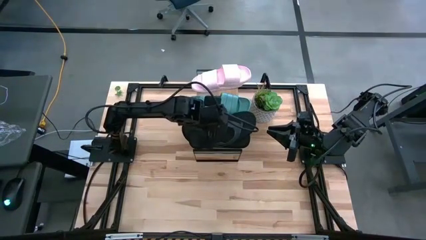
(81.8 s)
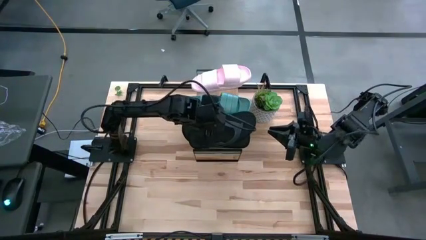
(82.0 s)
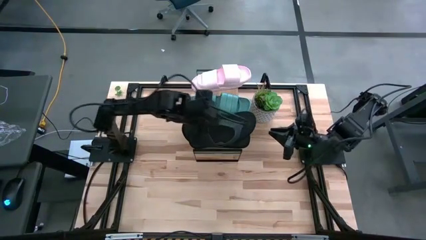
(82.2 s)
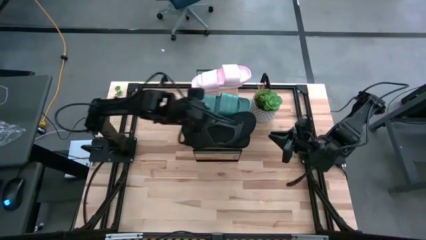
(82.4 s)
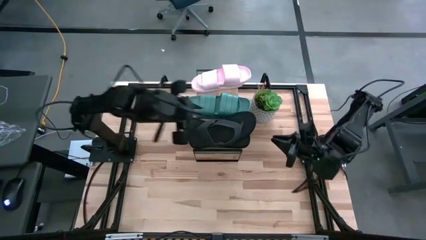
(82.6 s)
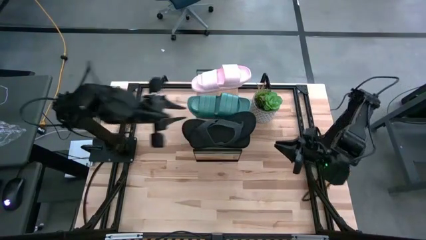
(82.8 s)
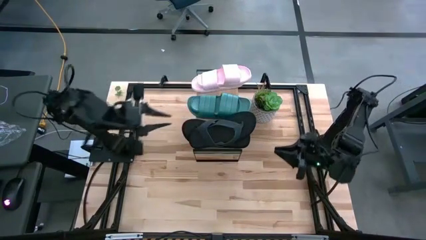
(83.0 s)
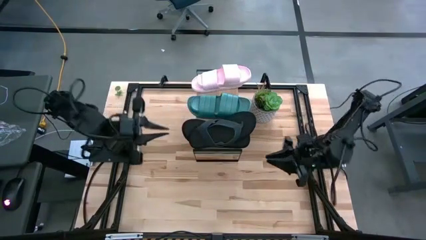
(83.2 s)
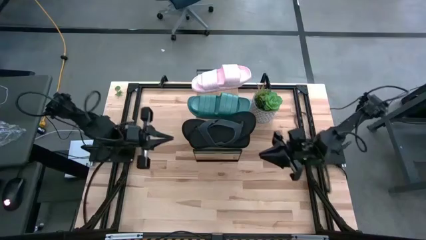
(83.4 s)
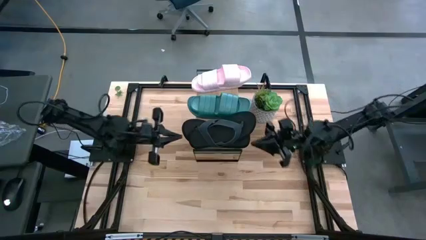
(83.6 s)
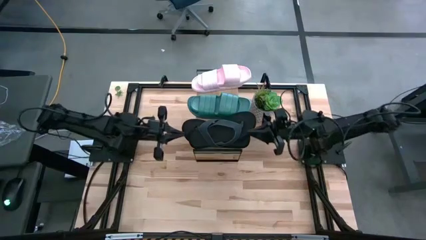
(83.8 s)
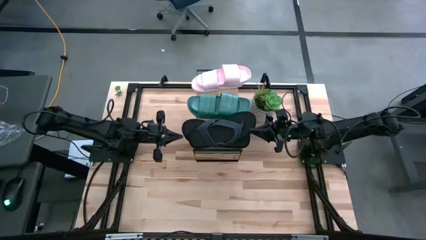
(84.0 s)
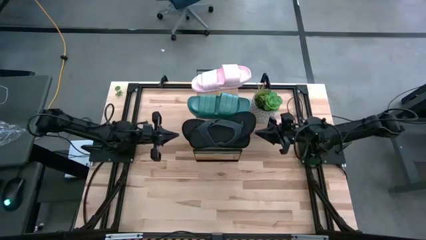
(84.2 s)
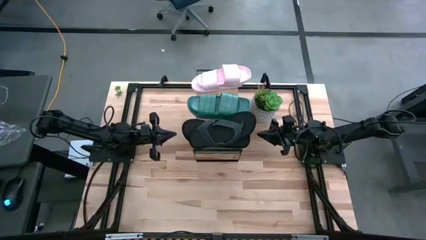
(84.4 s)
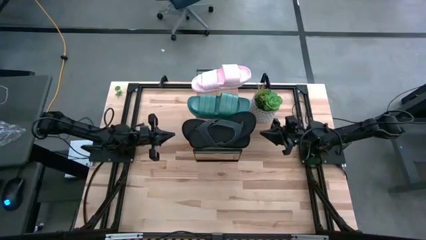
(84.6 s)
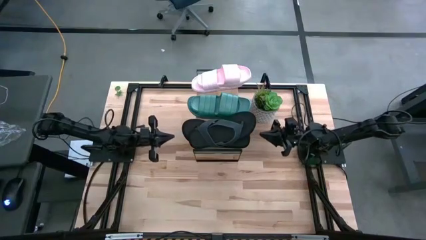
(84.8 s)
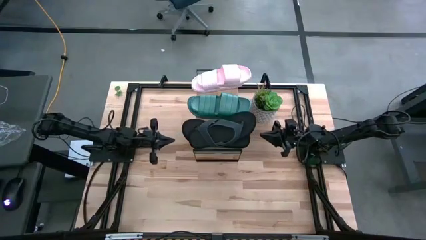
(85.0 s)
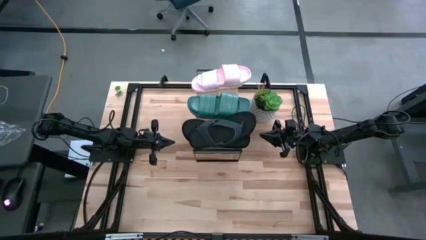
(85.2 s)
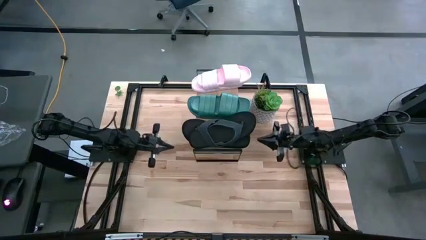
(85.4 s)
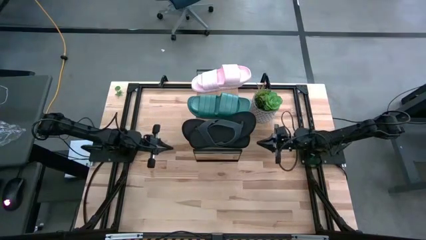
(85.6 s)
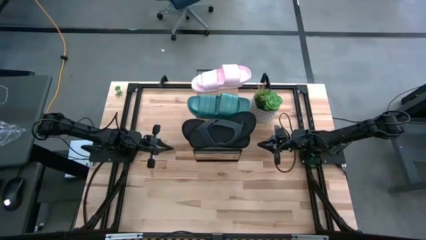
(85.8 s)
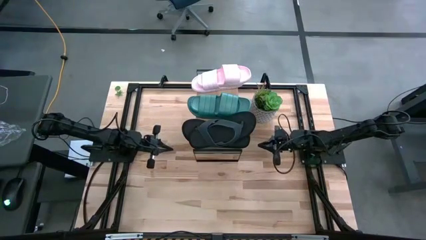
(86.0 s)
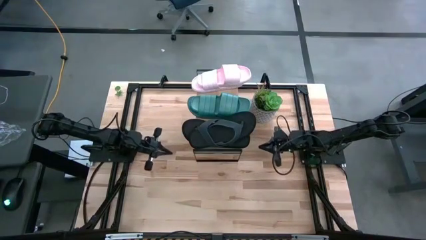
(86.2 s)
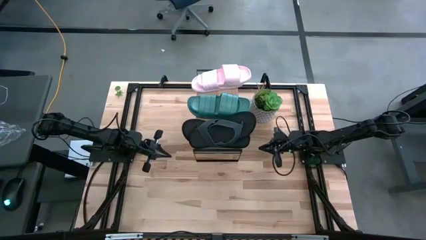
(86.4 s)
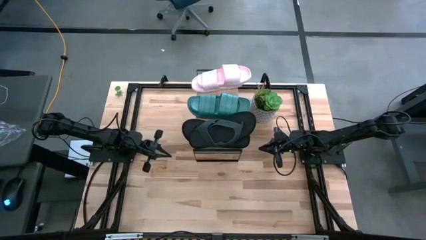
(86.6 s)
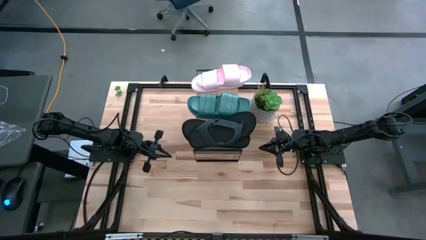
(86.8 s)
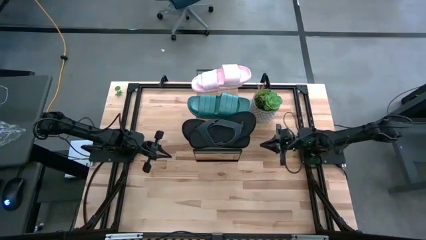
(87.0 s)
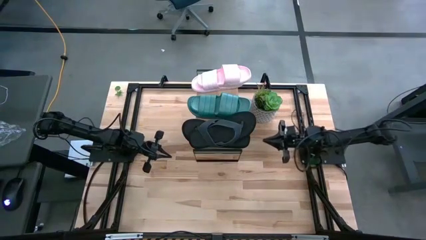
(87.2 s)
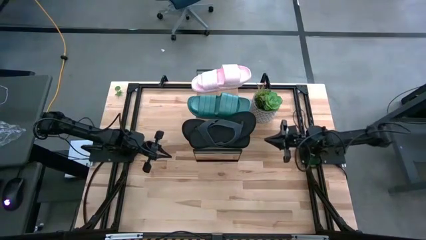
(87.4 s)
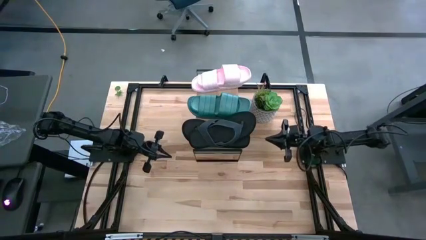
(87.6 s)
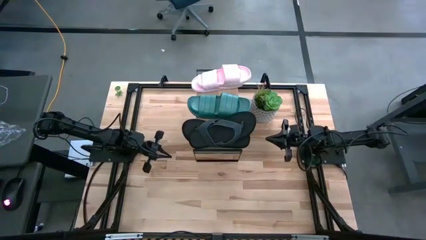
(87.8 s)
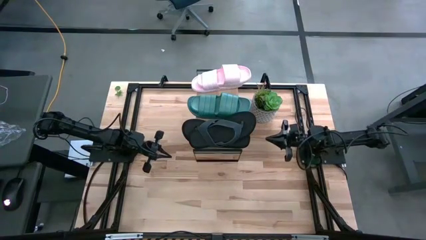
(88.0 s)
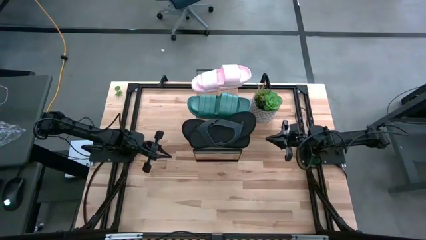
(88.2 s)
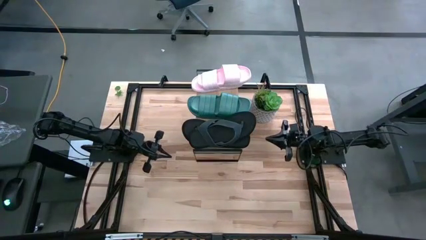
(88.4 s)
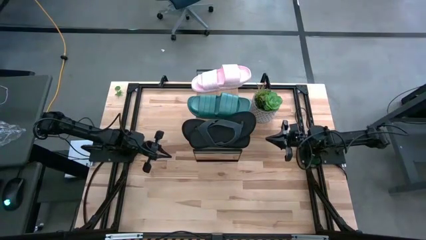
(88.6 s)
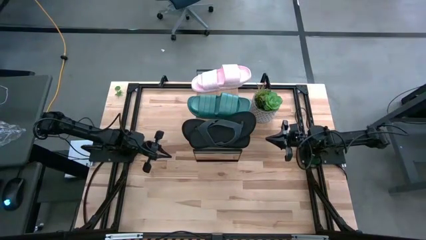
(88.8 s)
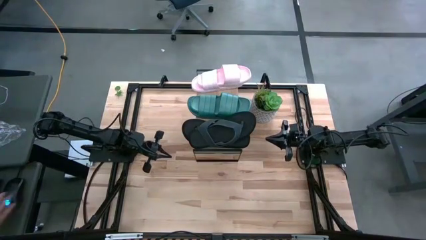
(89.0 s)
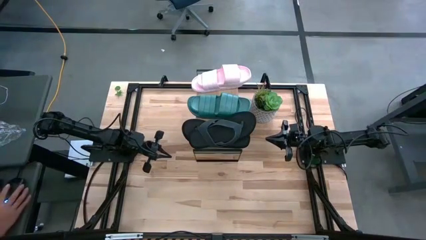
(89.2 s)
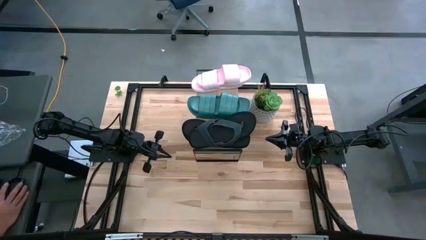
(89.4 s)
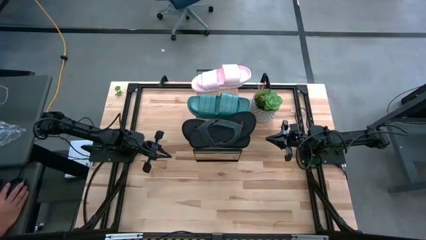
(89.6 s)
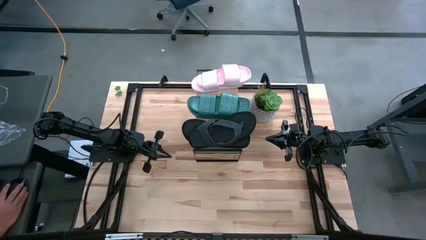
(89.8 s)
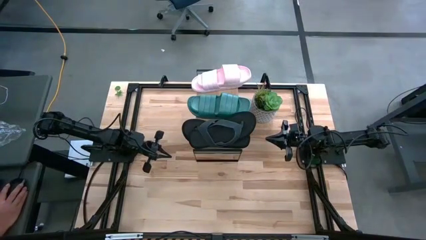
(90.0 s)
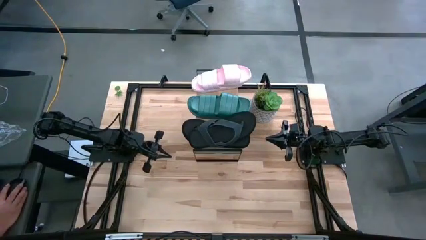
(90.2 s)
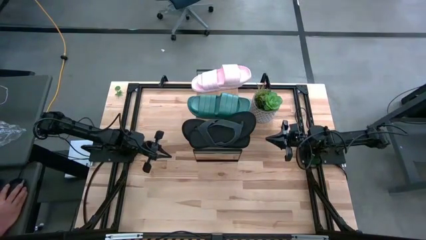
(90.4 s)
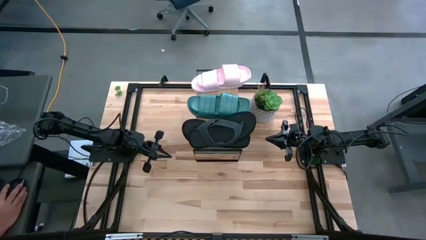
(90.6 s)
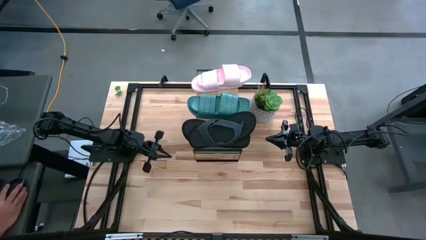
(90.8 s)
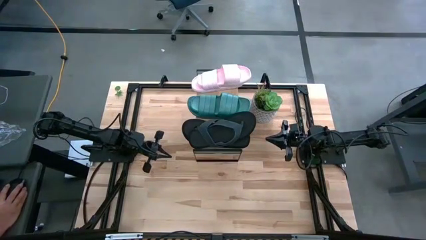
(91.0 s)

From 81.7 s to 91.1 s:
Task: Pick and place slippers onto the shelf
Return to Home Position

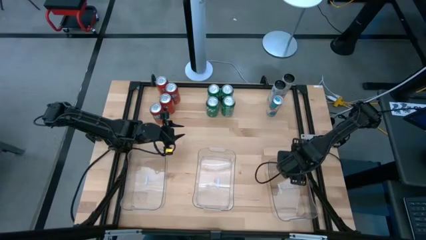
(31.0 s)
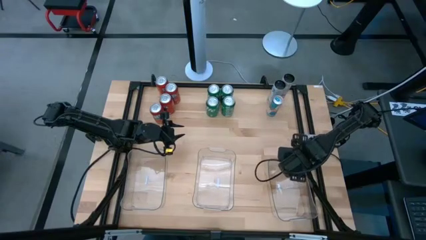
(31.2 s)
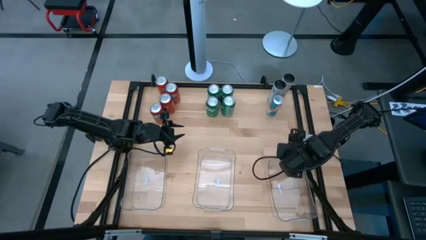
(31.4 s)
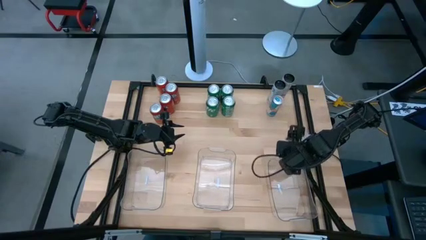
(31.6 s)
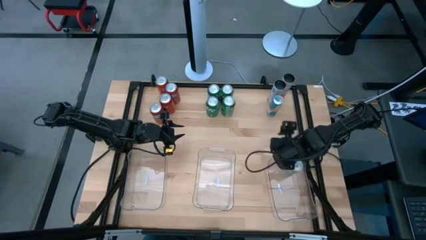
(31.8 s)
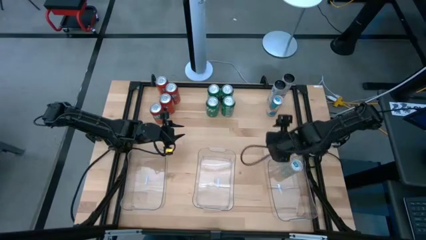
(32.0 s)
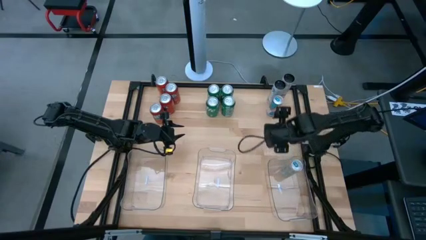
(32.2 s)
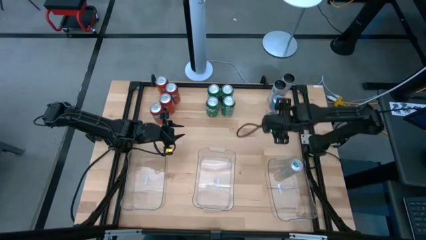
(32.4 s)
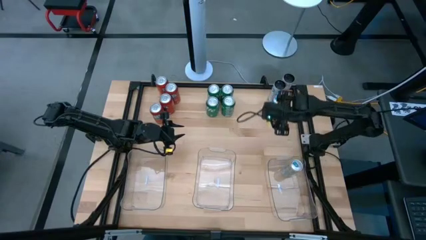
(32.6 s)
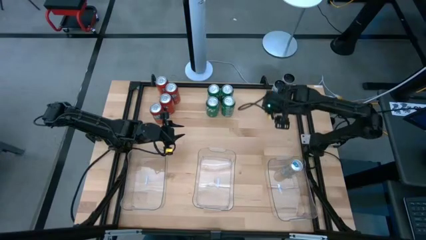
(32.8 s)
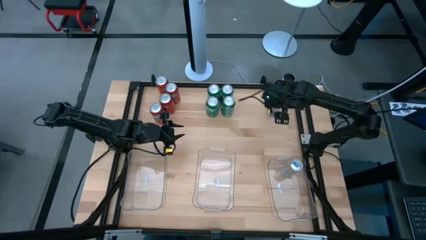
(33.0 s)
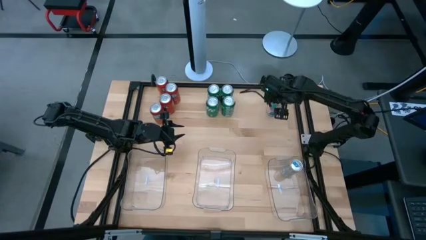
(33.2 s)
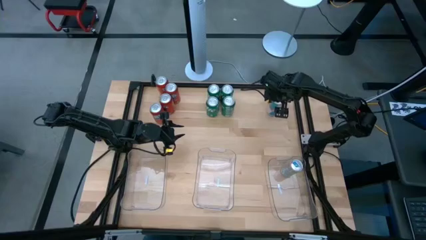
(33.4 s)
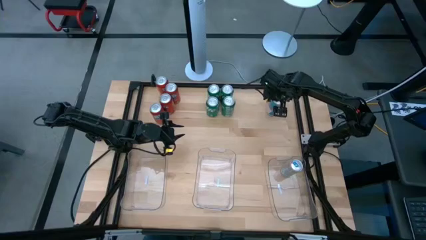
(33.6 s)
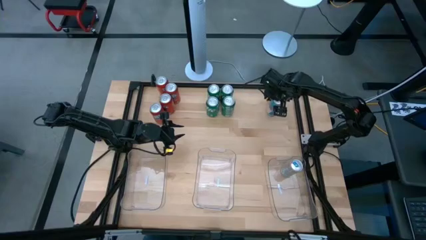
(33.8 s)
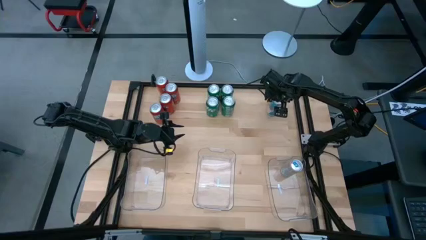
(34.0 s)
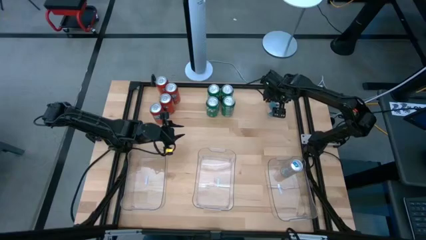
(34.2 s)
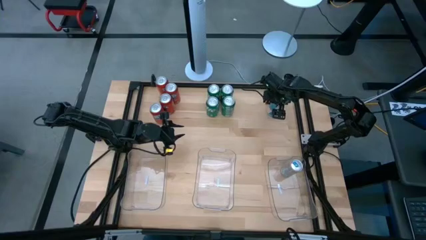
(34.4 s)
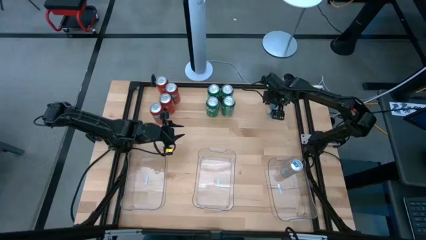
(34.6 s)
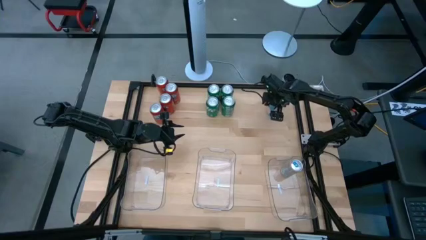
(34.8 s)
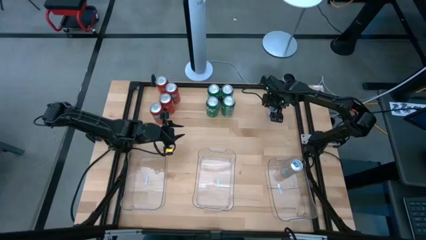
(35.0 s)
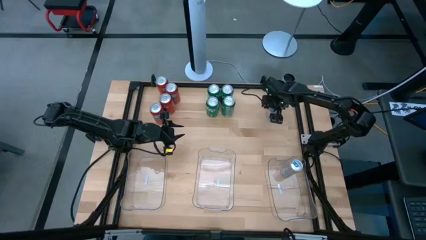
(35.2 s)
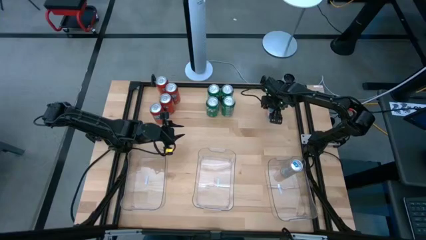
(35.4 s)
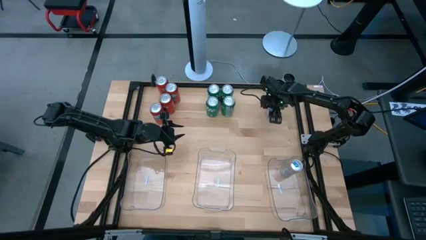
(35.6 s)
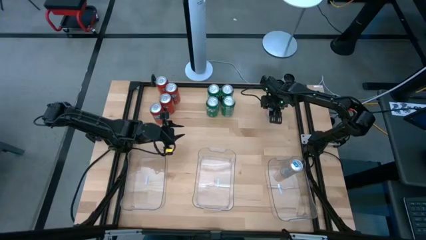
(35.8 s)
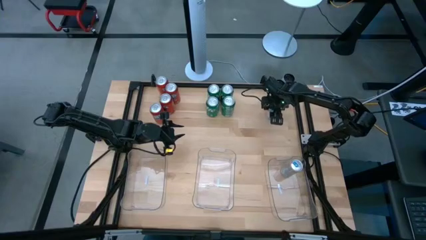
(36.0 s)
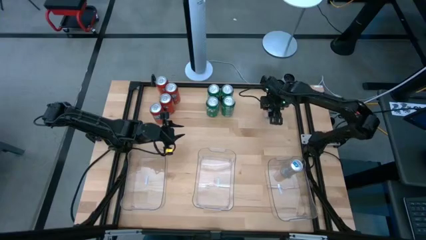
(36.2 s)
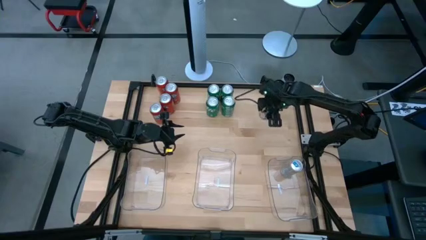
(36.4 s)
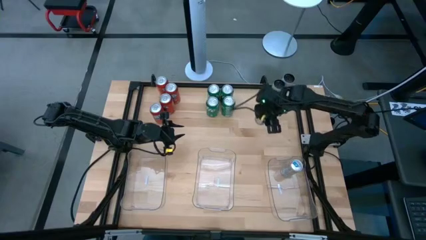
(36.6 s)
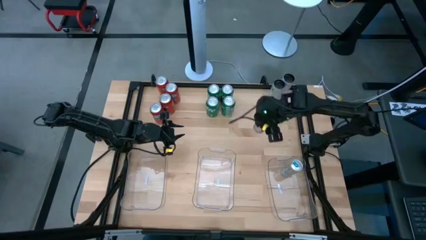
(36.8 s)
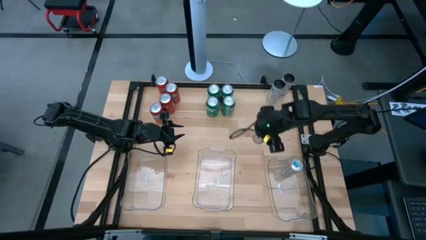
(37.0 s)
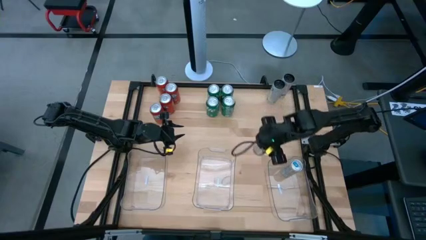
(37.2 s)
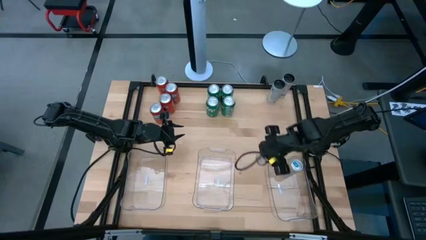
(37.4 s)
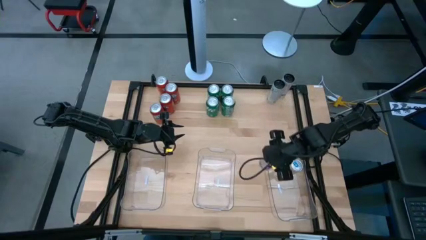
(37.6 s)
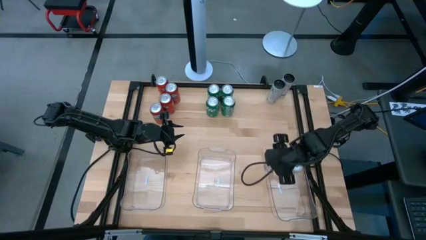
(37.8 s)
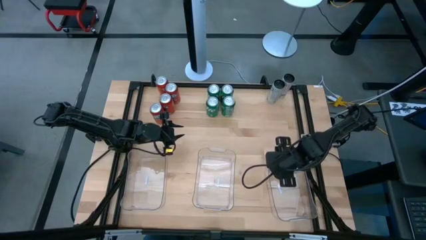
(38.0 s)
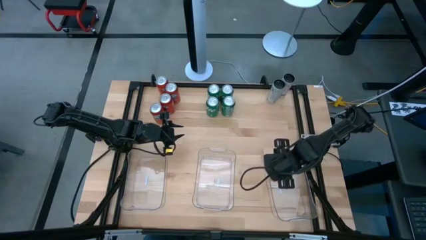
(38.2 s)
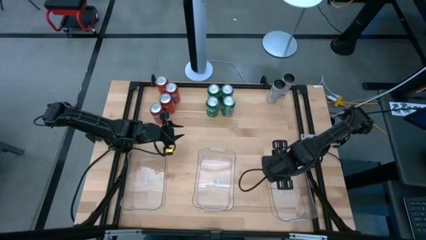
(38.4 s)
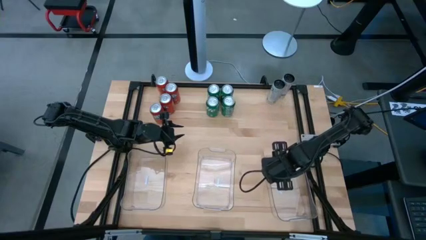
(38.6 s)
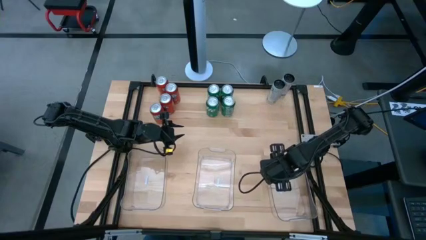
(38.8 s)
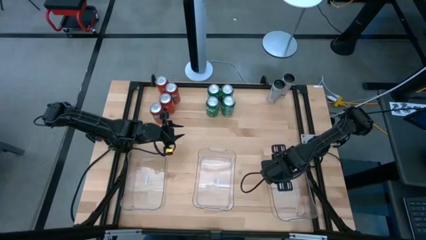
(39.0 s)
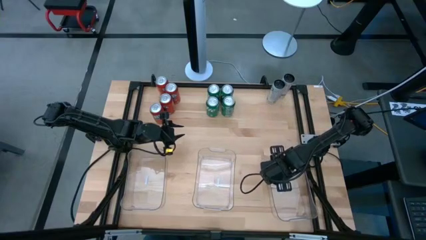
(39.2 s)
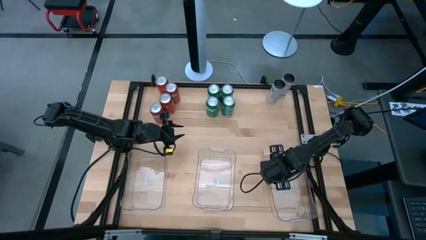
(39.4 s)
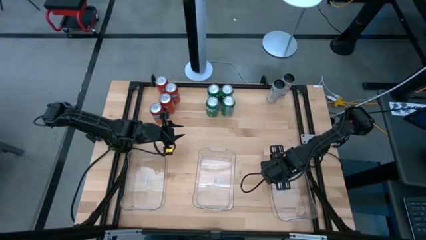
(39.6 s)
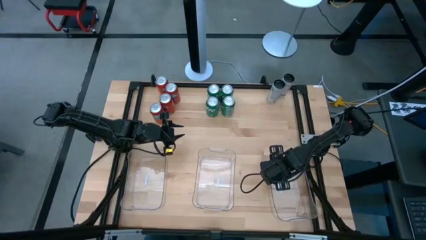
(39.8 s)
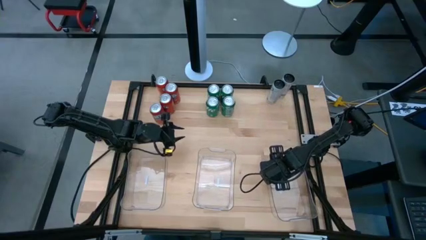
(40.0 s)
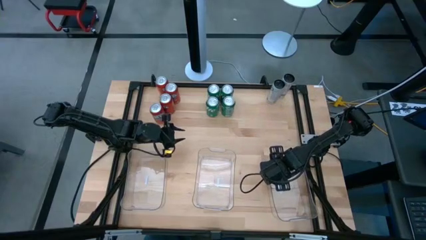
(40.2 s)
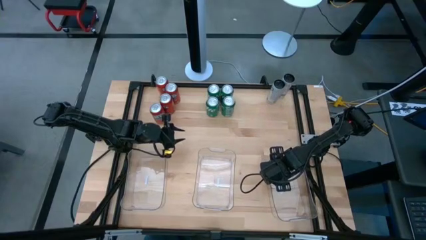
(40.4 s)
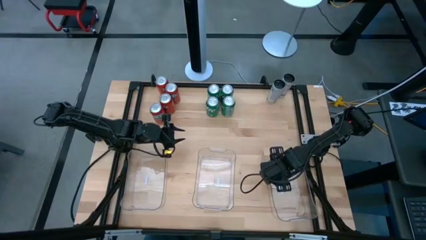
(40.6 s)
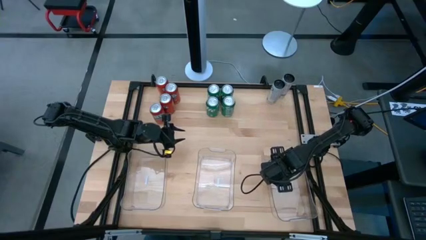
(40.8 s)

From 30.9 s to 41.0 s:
Task: Sort soda cans
Put the blue soda can into the right transparent bin
